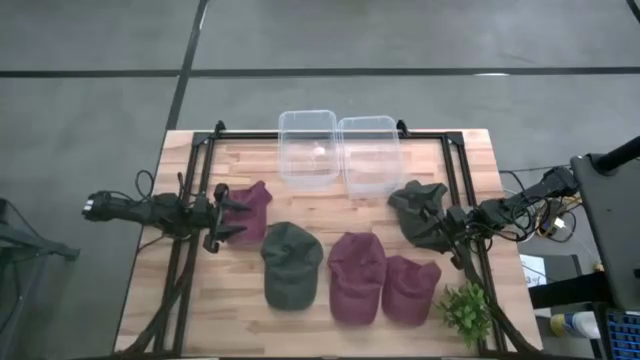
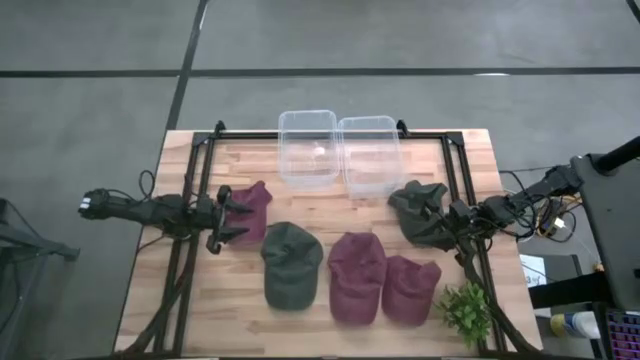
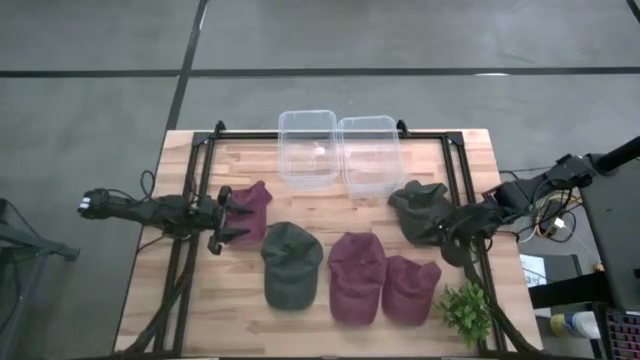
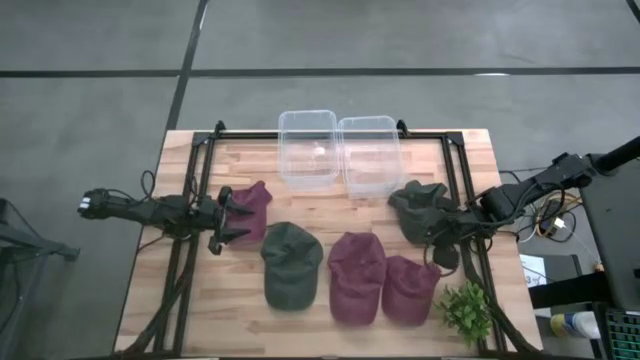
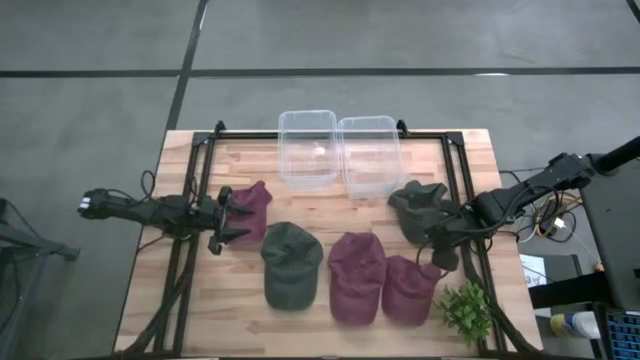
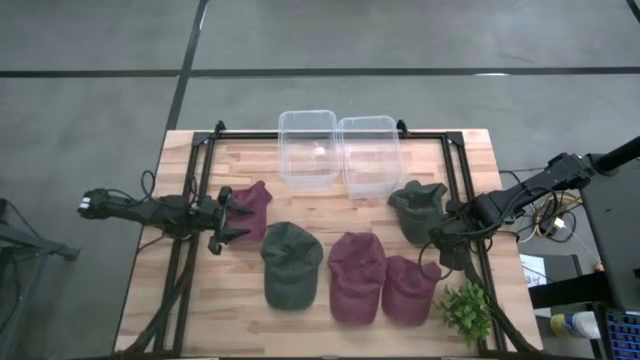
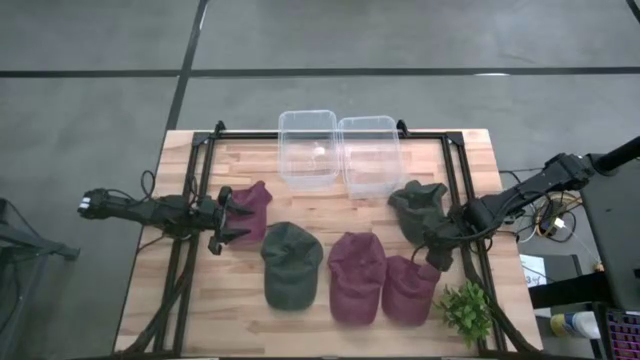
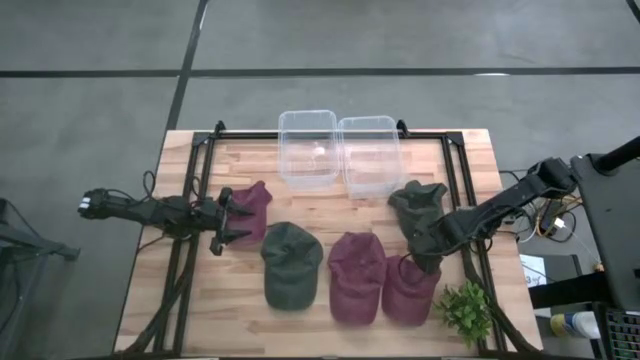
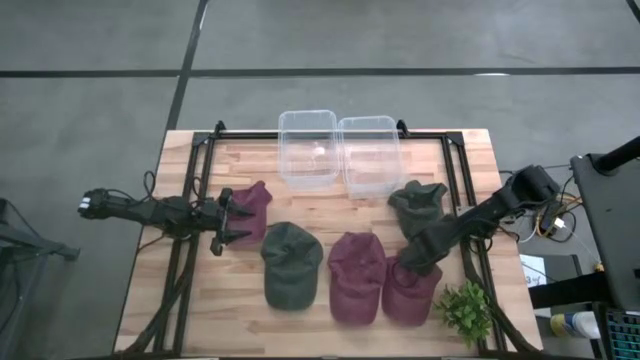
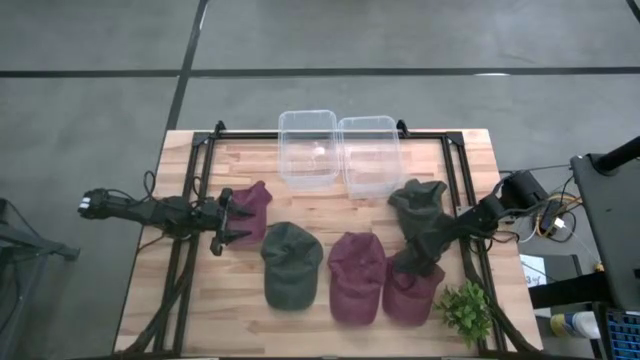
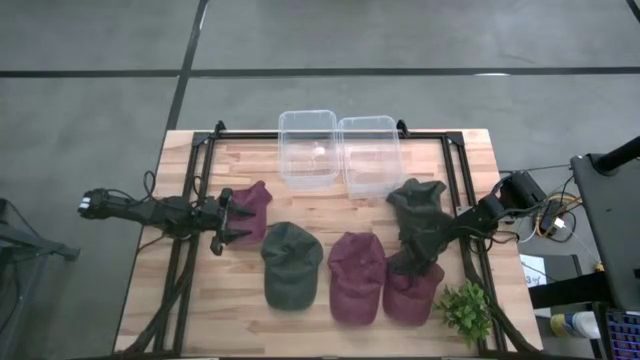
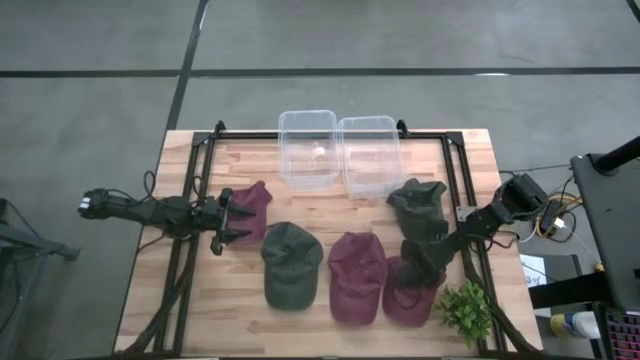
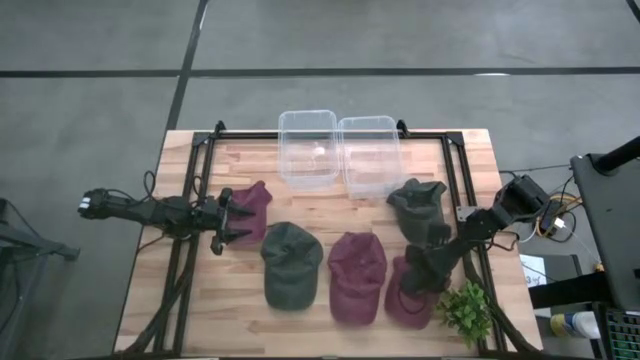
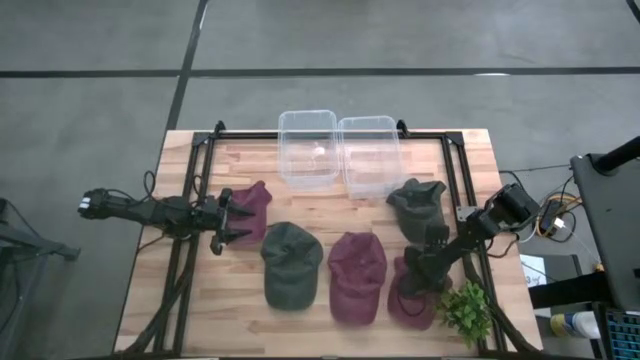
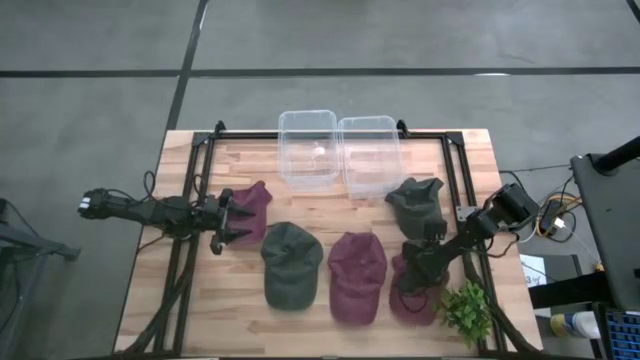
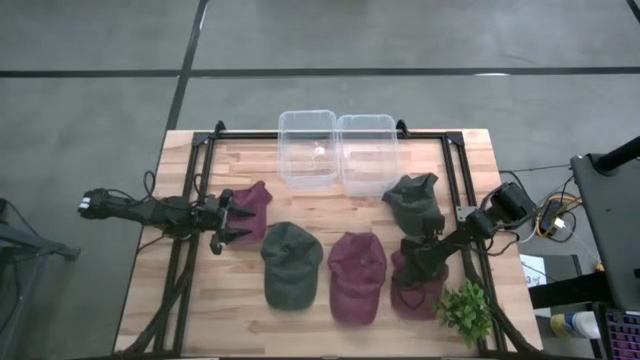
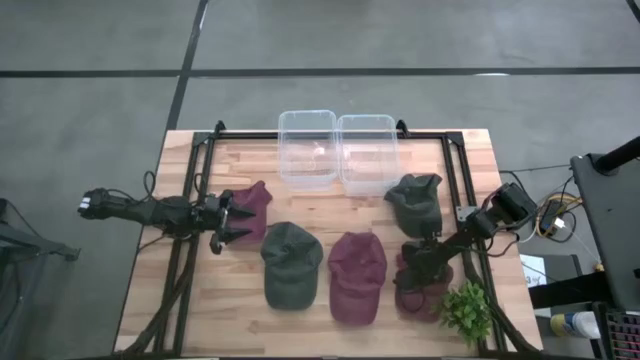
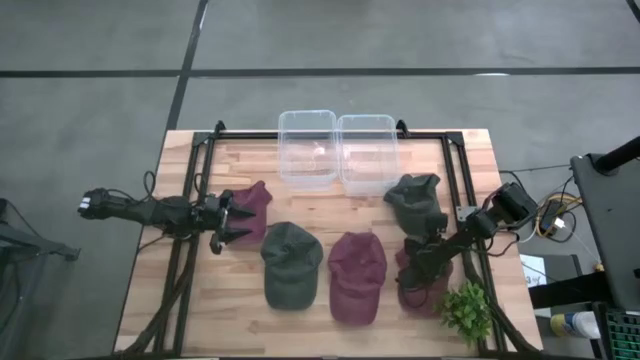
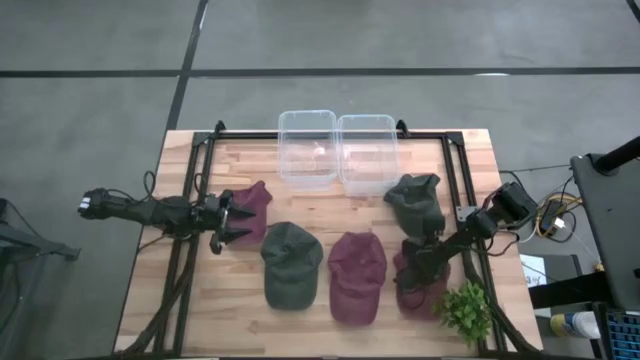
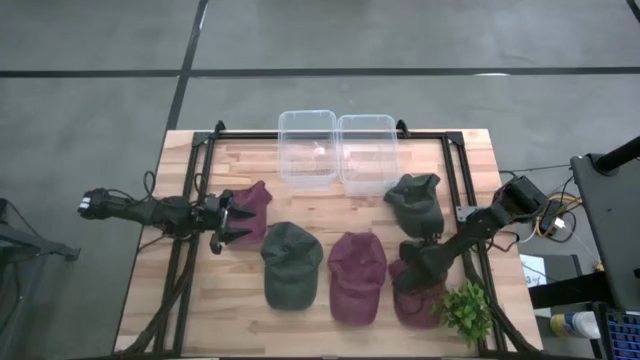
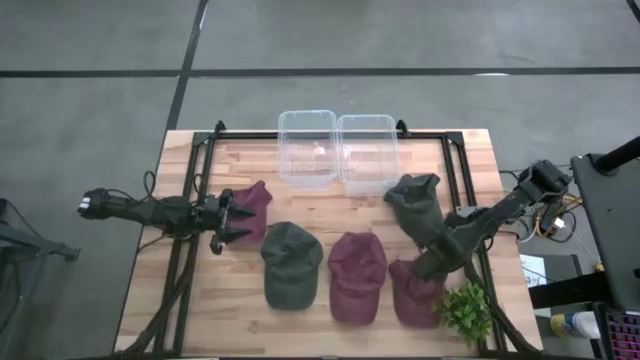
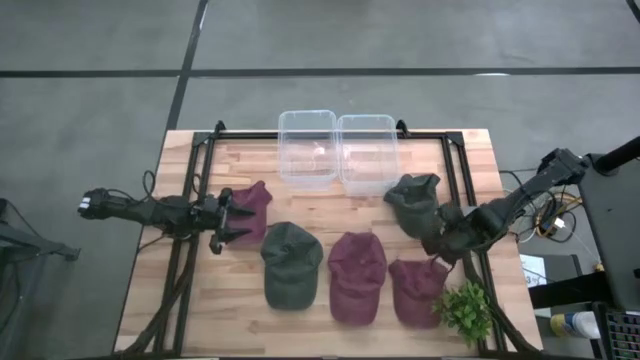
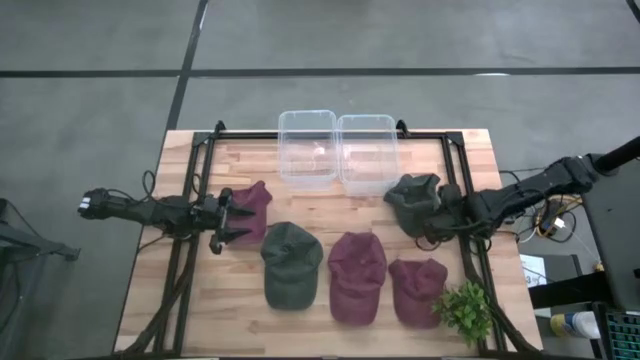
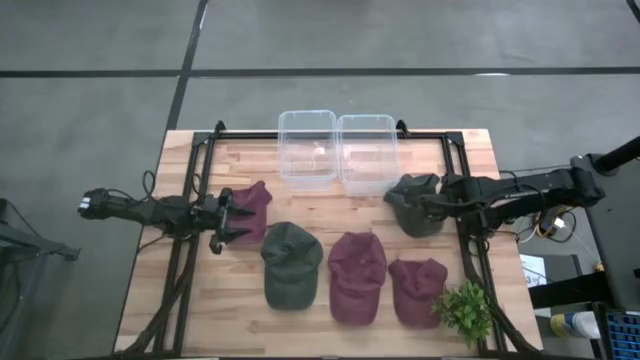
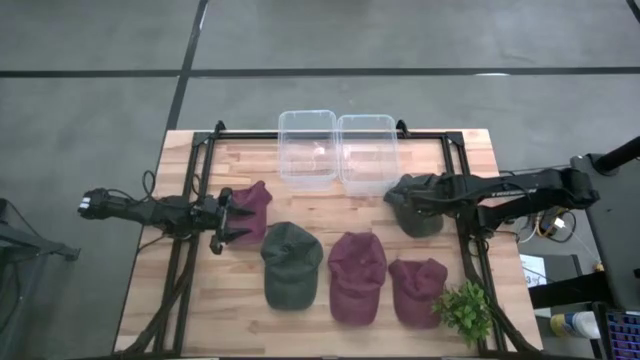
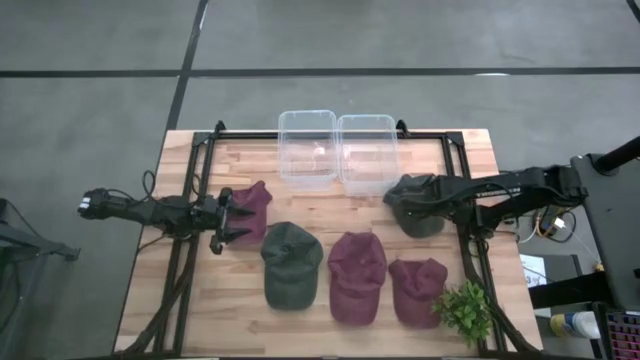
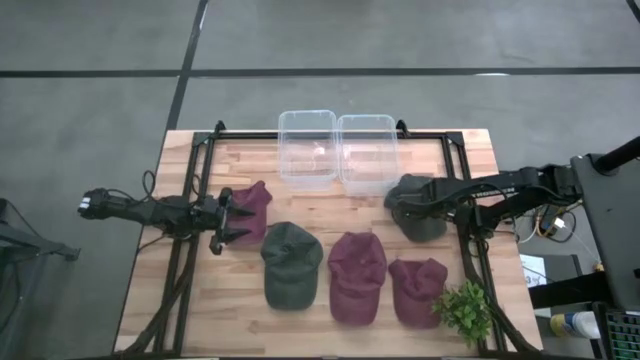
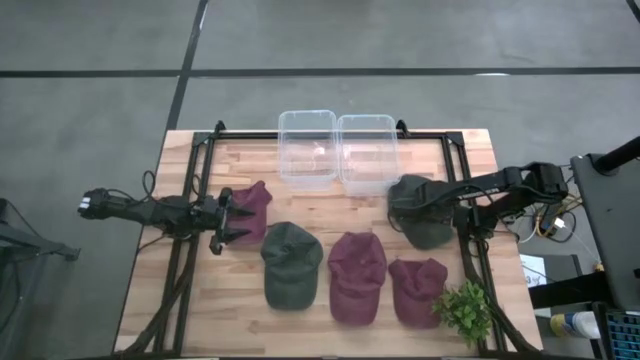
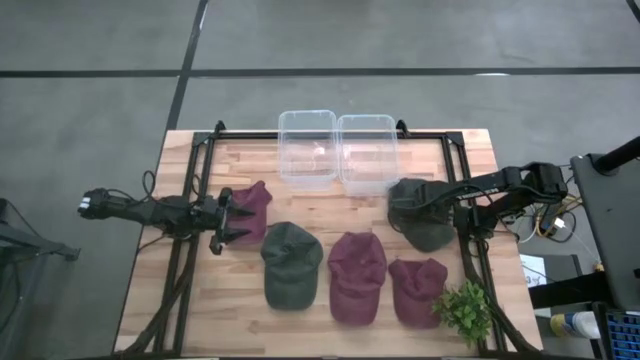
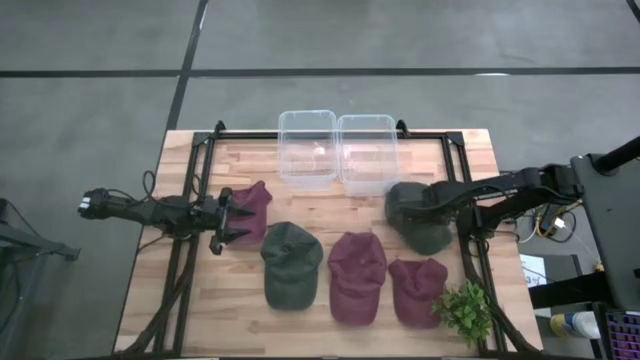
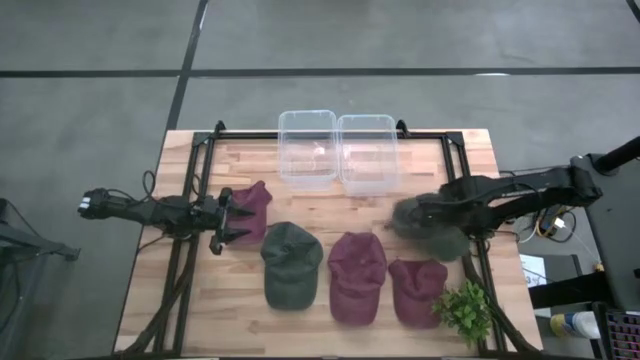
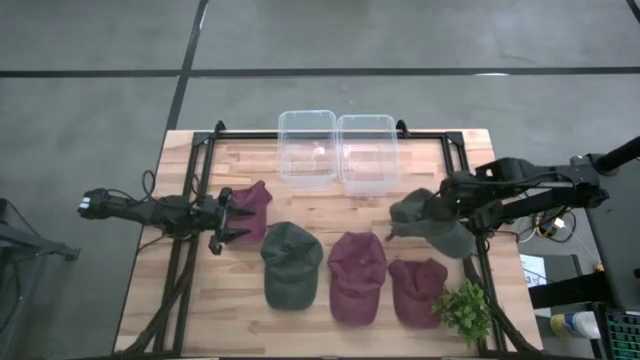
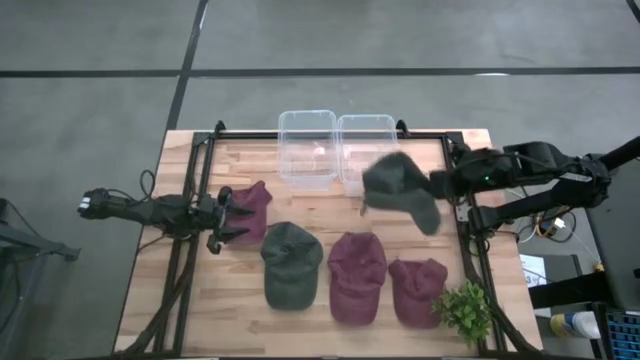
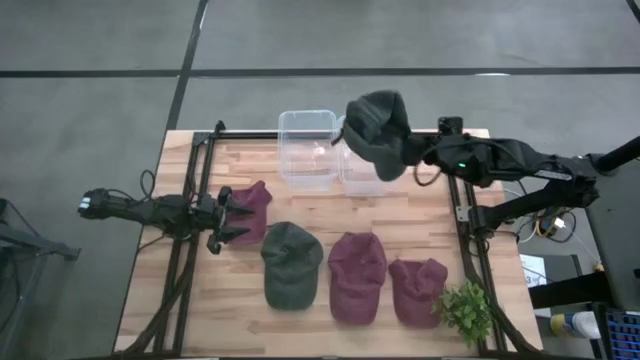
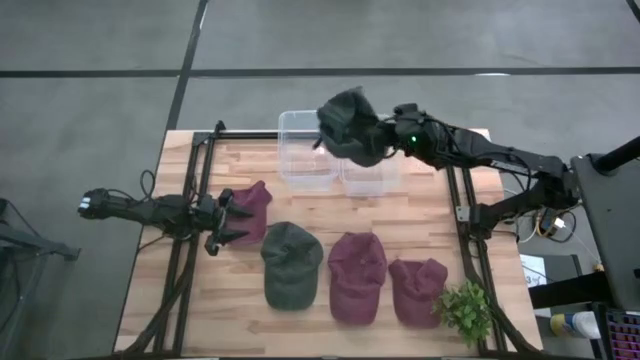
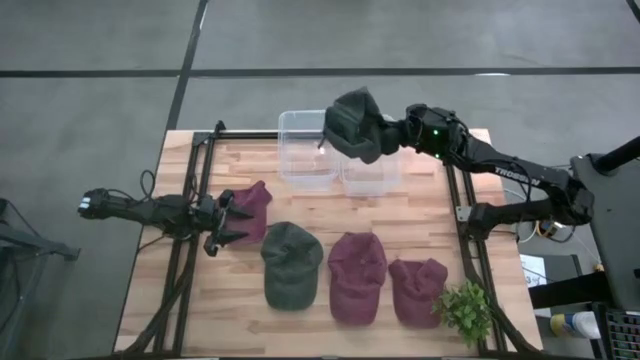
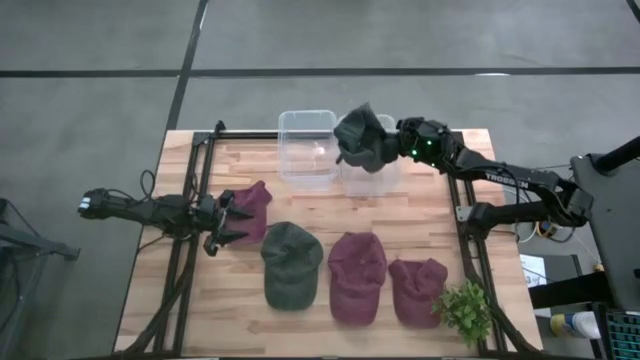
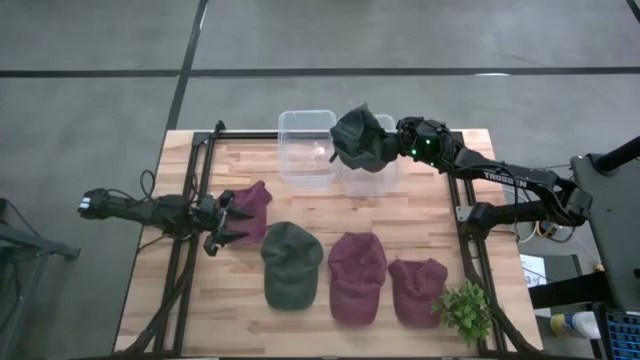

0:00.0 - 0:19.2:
Task: Pick & Place hat
Put the right black cap into the right transparent bin
